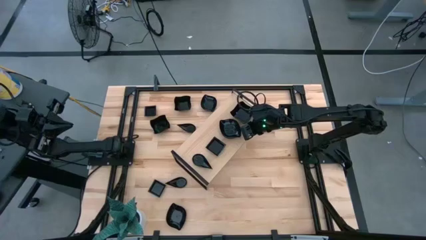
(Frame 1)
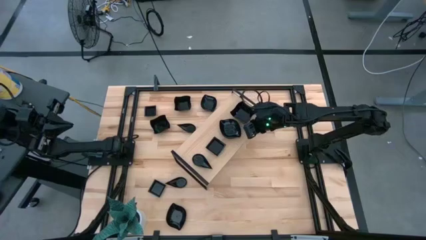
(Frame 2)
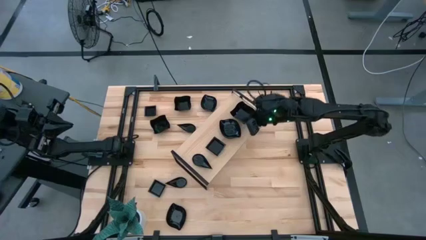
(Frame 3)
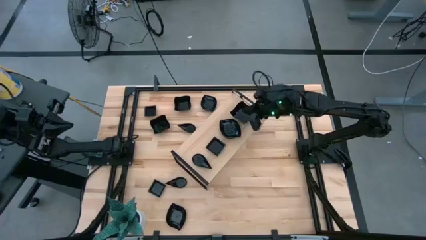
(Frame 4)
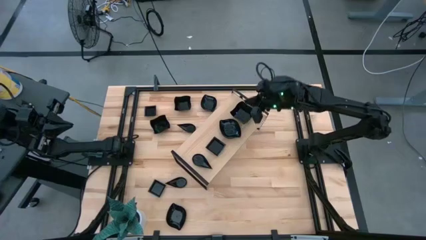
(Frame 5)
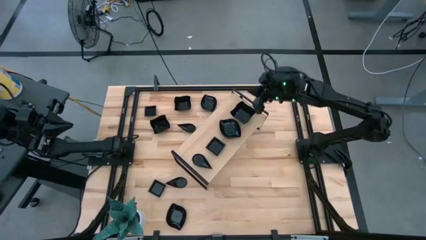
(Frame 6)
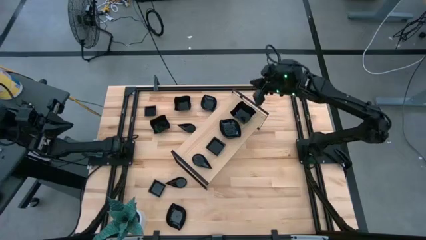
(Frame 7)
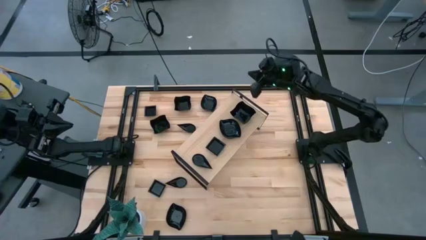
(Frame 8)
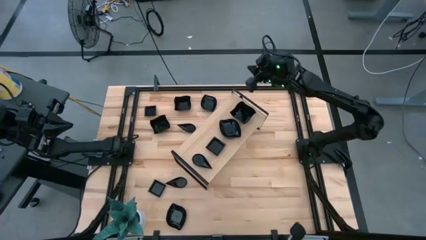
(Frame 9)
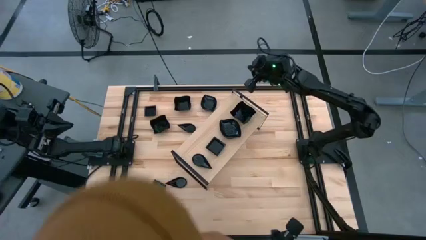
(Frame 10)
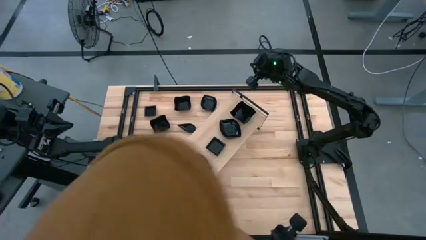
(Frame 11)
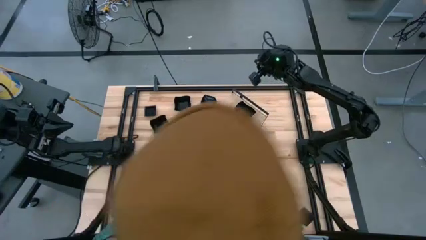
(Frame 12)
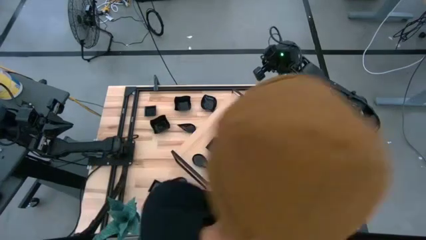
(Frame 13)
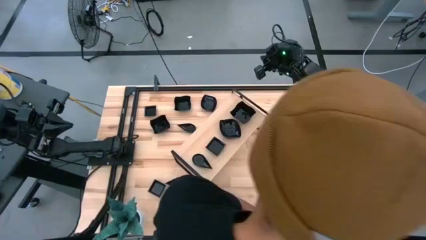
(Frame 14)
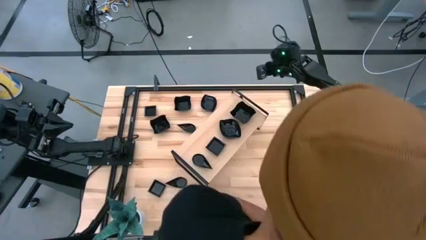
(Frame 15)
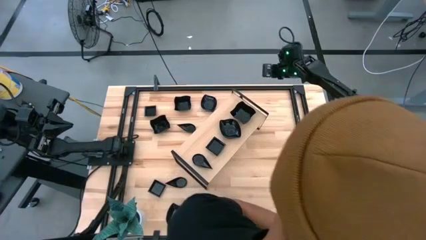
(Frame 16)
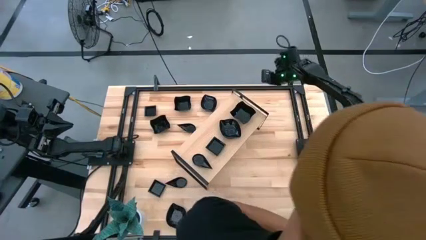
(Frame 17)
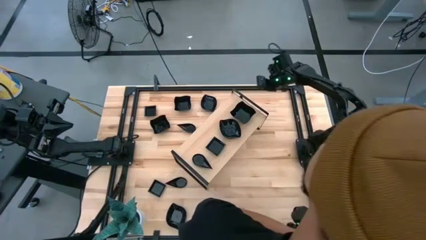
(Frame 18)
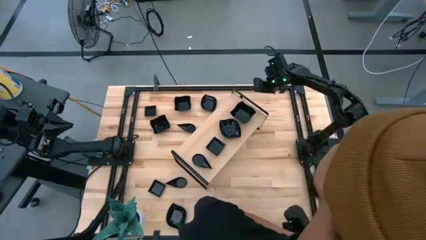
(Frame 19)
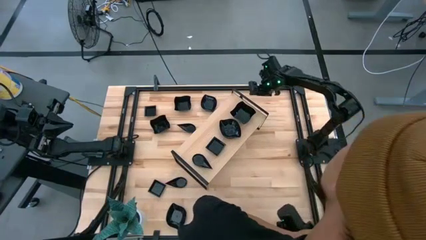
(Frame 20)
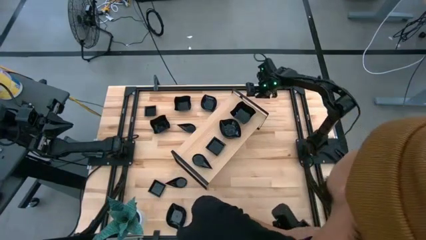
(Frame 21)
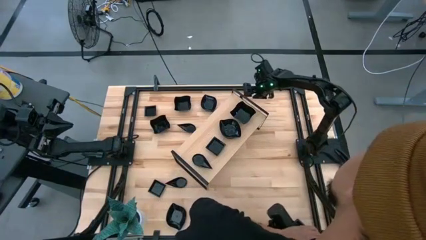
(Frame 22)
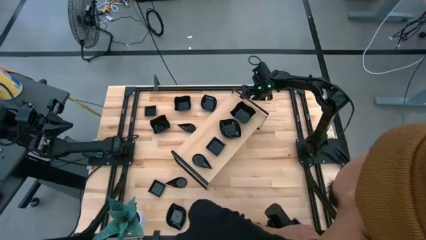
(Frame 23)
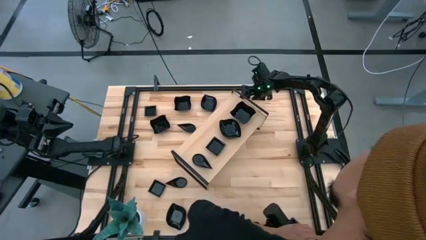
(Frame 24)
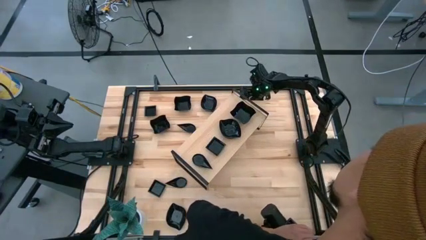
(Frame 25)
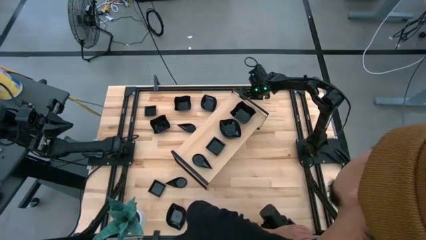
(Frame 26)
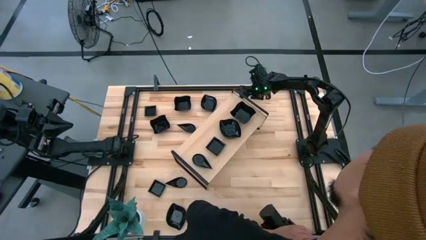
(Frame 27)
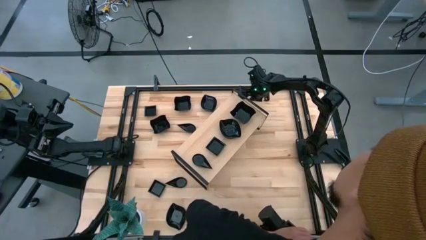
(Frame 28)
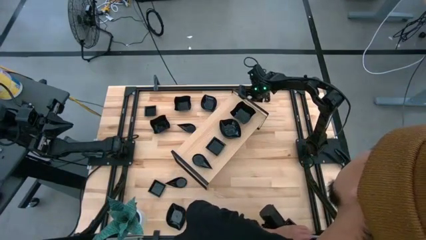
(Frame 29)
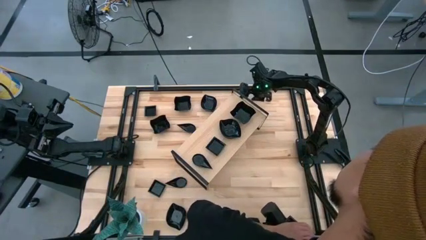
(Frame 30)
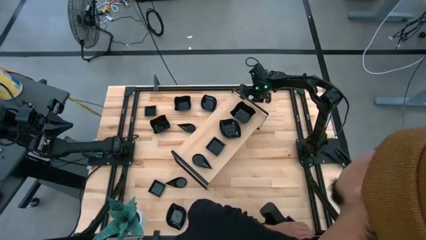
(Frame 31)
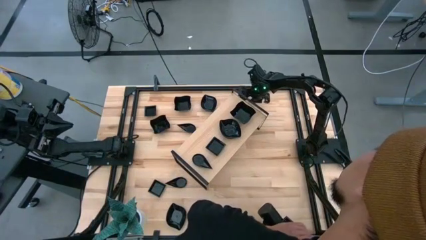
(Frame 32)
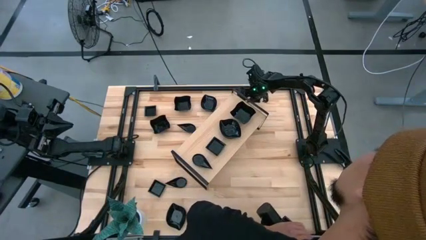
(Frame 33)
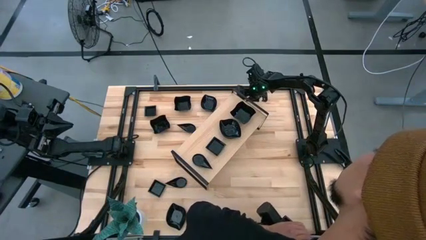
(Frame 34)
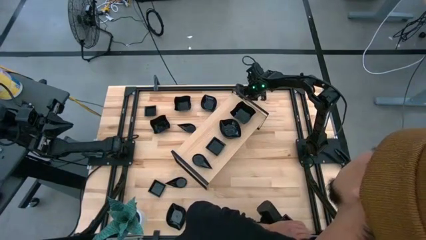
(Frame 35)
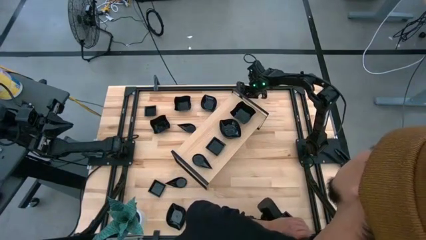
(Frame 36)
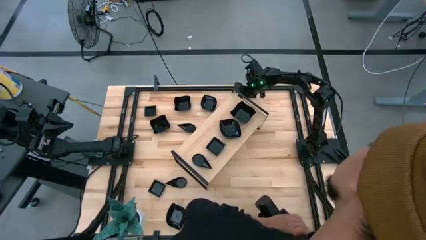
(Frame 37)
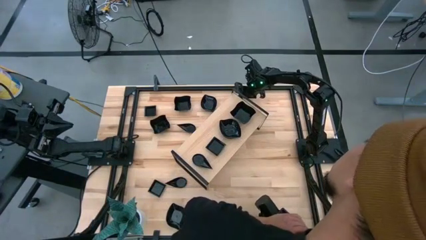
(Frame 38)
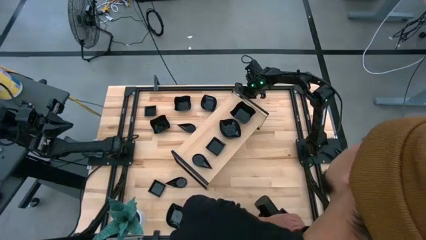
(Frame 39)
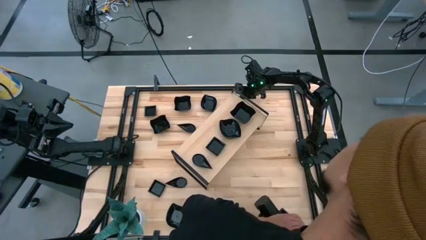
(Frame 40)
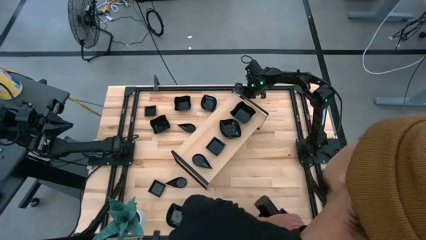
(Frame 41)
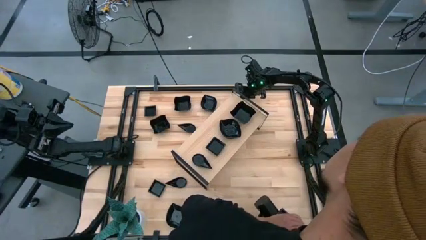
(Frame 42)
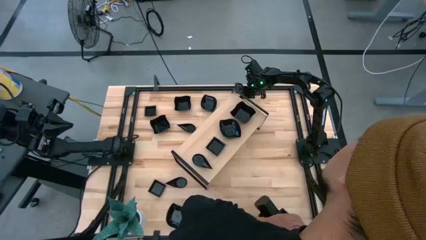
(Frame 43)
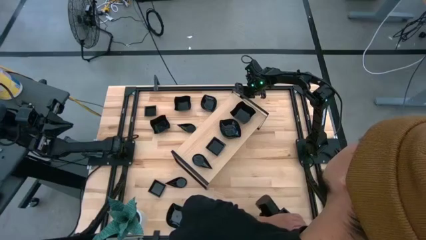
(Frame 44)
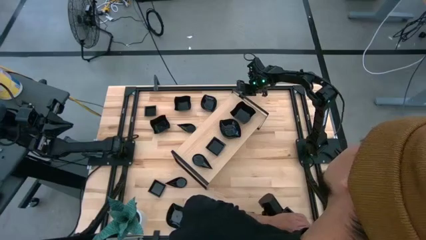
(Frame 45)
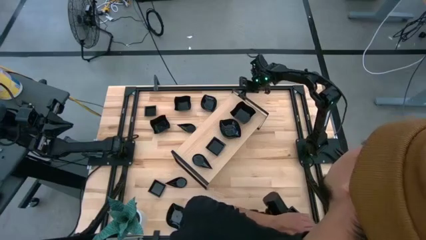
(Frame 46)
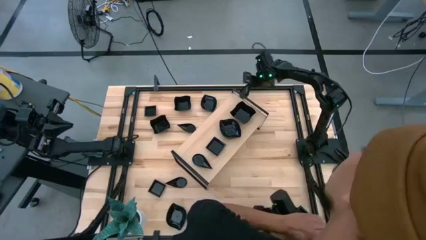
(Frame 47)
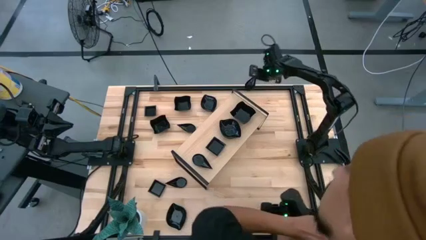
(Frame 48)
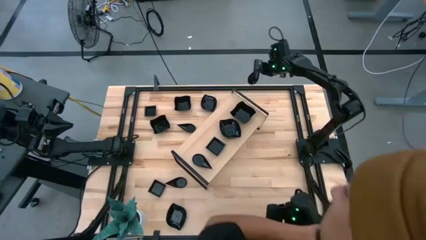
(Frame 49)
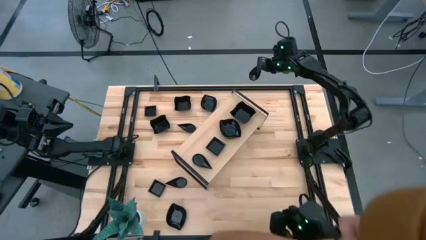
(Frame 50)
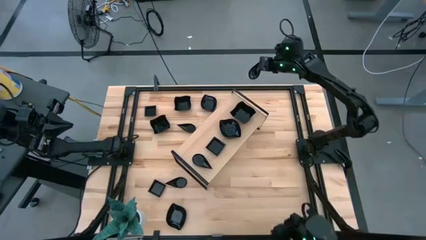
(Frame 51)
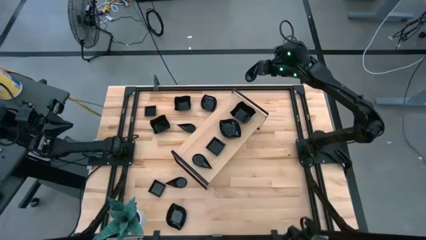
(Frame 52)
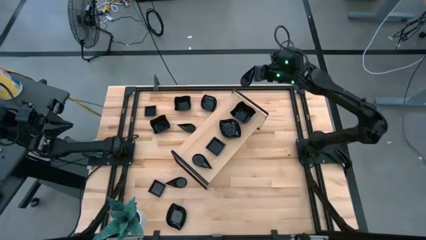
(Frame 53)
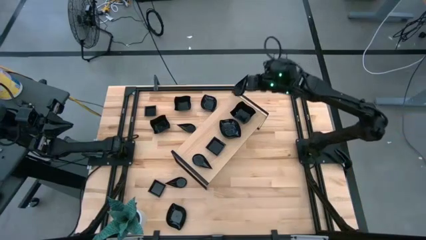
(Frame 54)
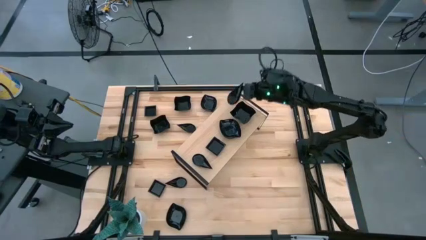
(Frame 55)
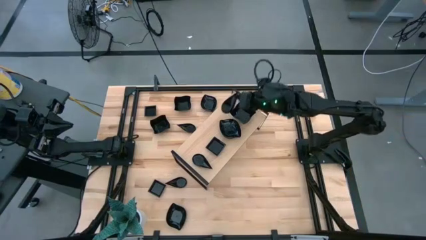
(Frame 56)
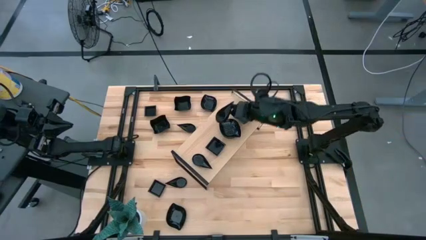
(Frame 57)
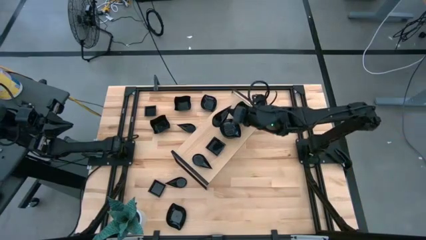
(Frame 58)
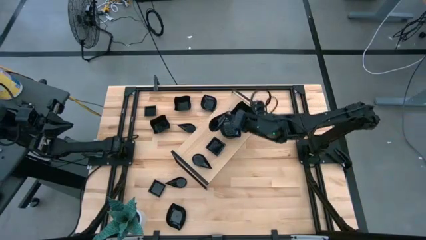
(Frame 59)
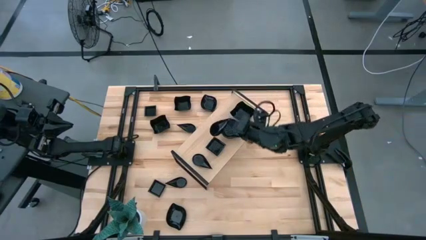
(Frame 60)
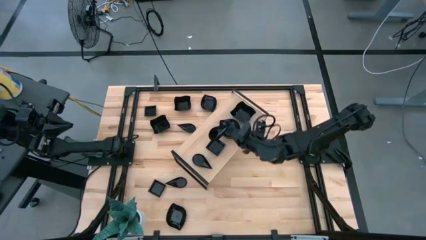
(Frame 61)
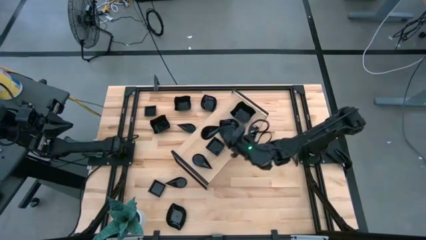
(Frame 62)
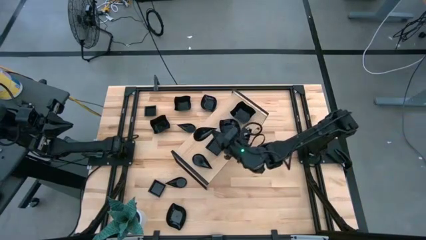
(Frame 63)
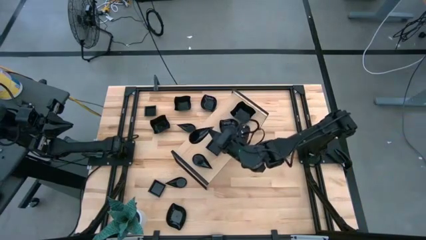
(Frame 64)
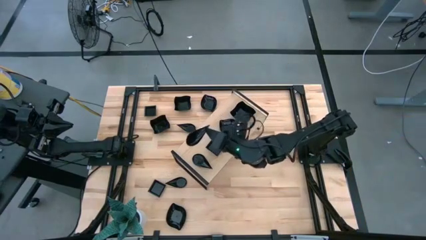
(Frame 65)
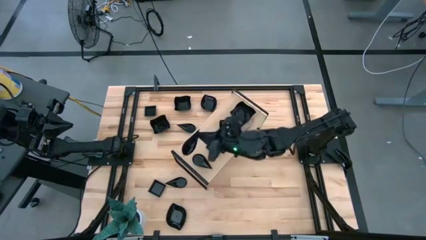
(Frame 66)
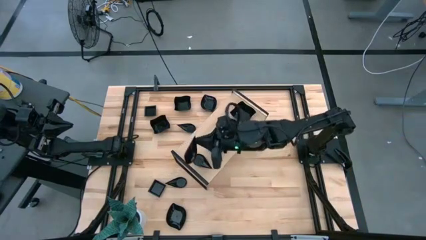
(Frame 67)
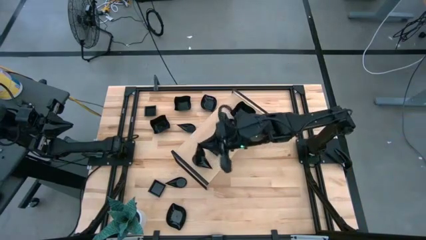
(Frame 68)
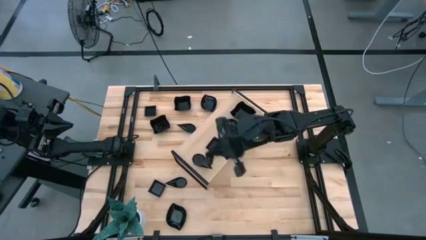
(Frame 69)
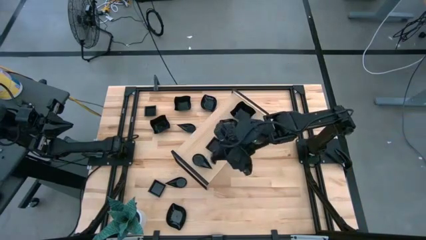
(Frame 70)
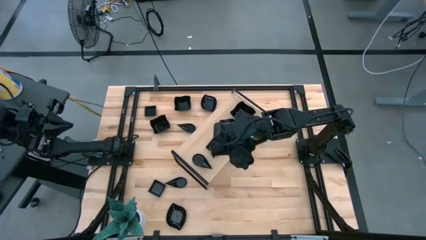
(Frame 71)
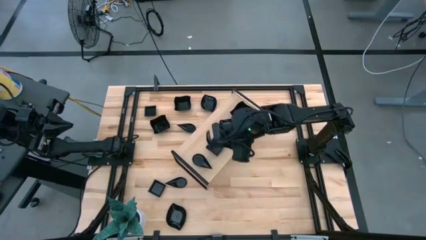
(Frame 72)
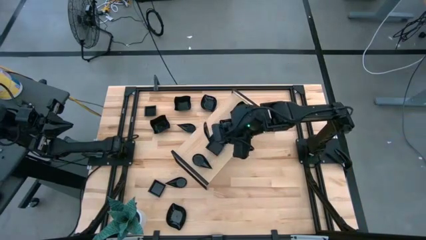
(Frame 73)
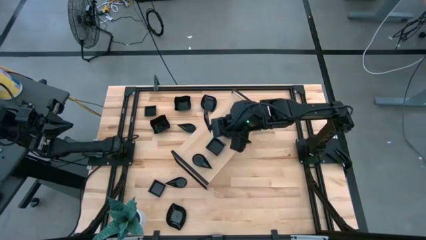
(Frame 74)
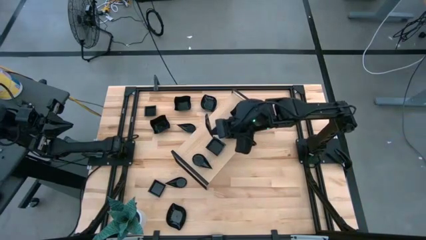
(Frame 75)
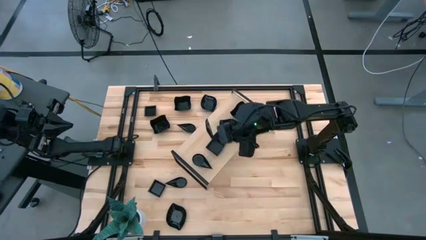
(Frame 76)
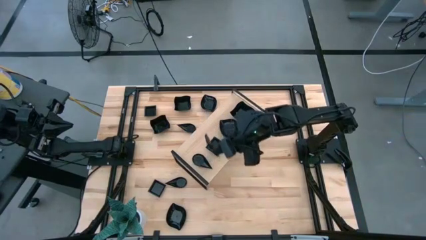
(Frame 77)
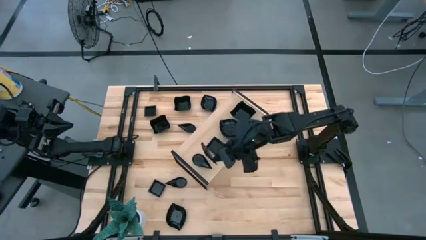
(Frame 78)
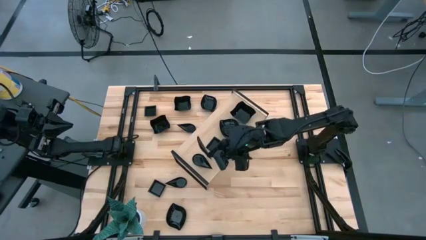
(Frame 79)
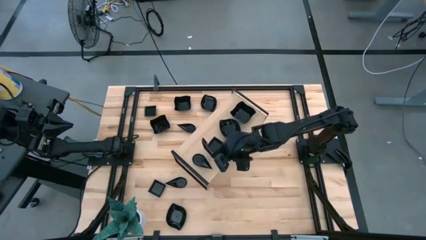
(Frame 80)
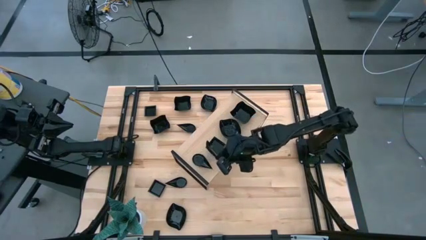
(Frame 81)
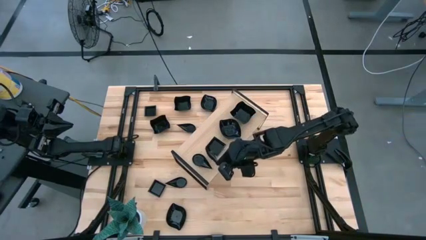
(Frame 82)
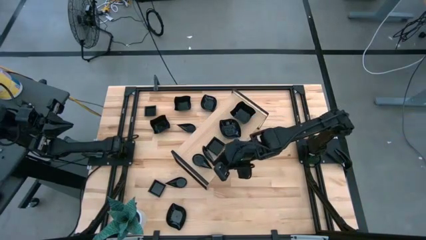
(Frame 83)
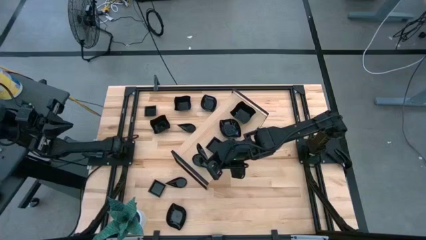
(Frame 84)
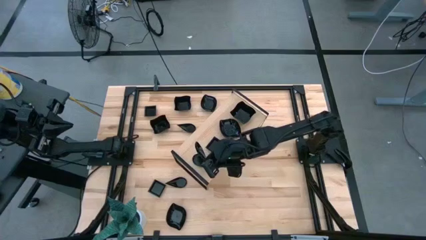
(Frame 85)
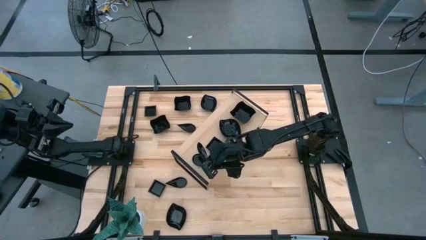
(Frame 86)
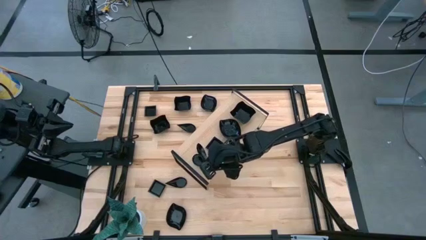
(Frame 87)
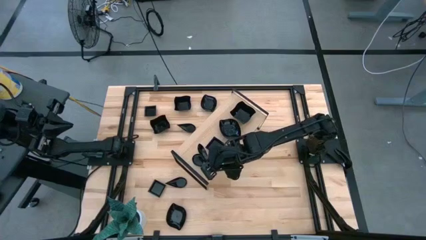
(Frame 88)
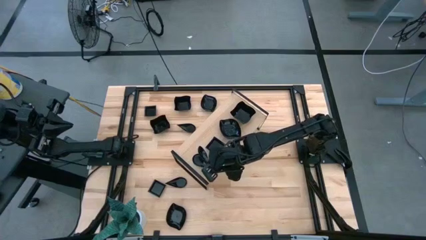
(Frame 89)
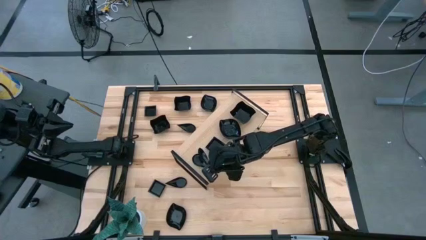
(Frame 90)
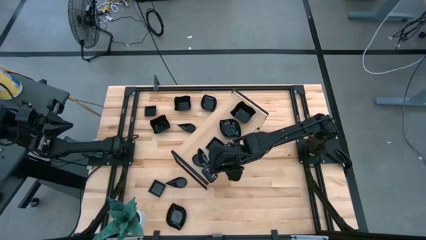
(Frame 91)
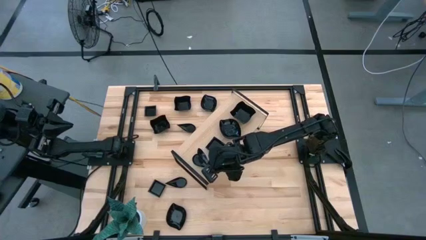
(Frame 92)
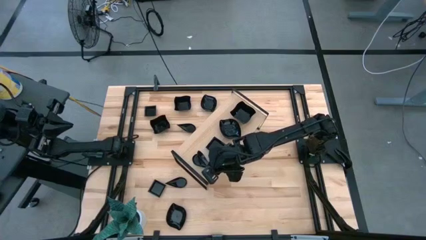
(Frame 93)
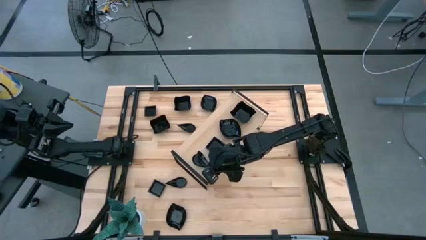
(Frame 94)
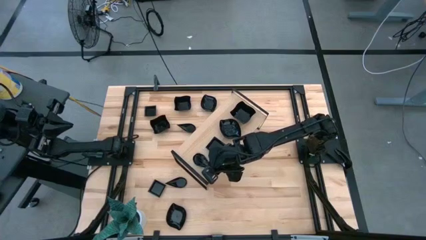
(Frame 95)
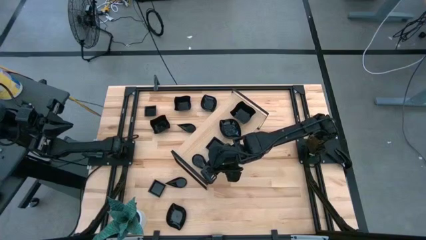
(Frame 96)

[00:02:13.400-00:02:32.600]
Task: Pick & Place Mini shaped plates
Stack the black teardrop shaped plate on top of the black teardrop shaped plate on the shelf
